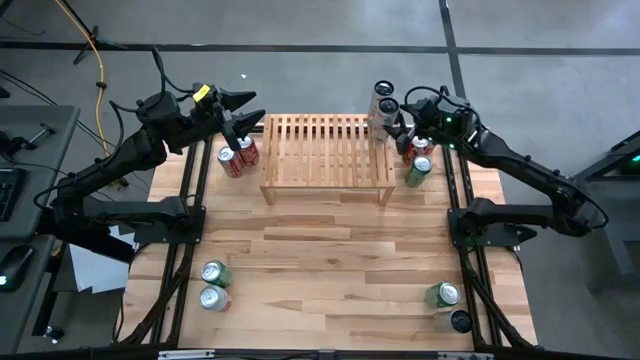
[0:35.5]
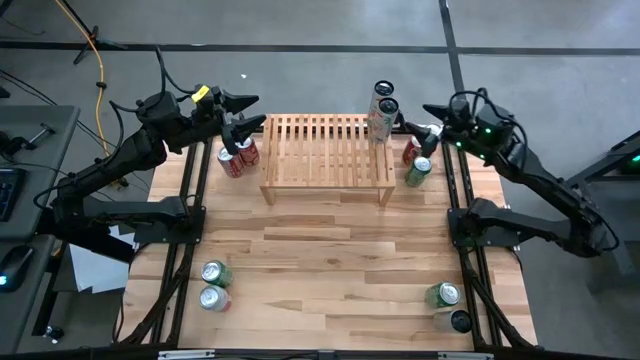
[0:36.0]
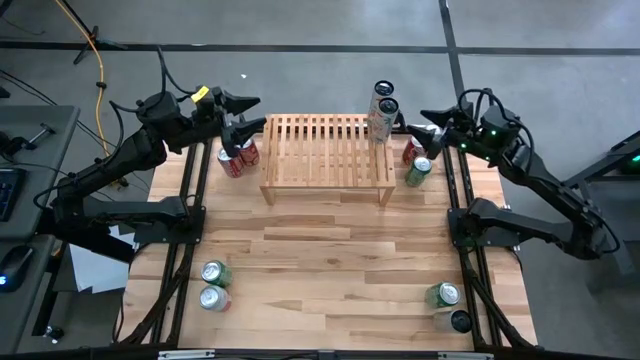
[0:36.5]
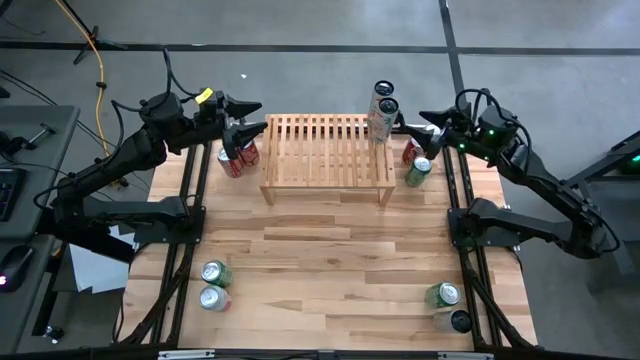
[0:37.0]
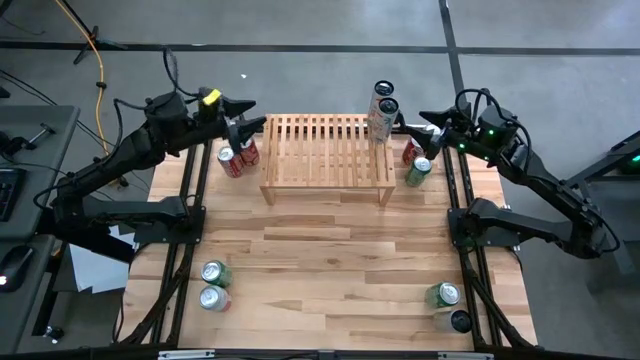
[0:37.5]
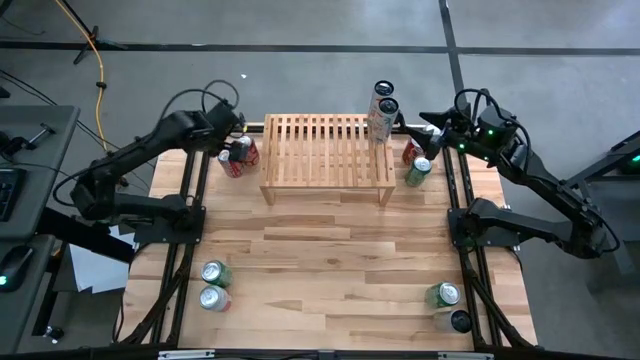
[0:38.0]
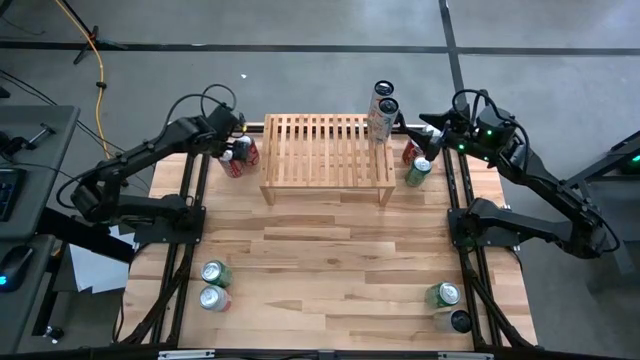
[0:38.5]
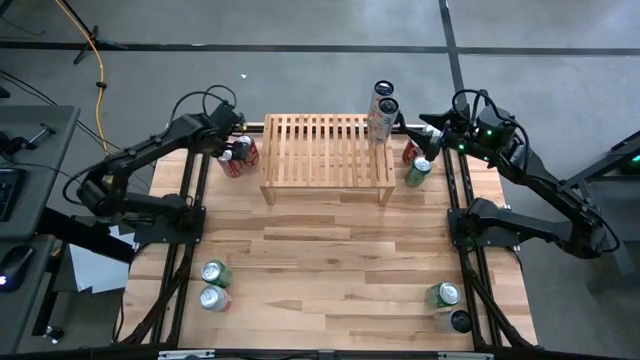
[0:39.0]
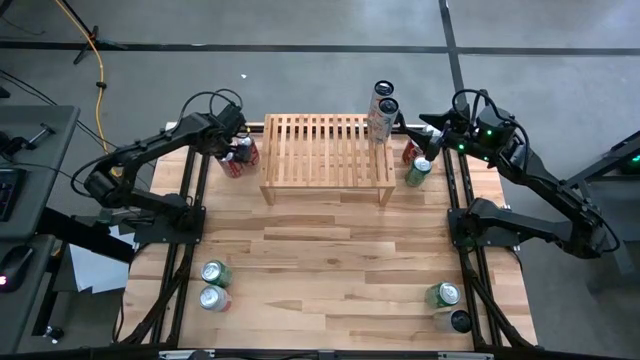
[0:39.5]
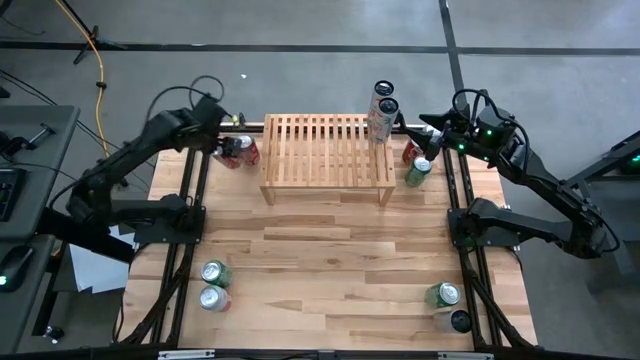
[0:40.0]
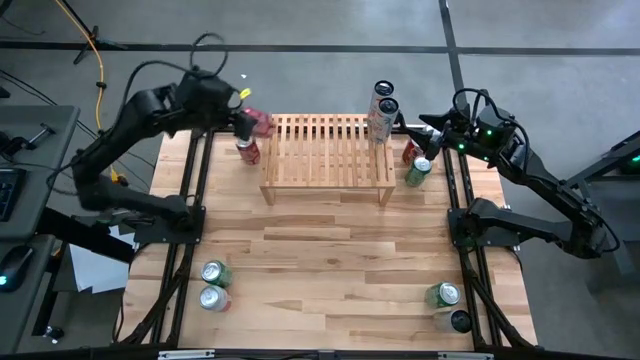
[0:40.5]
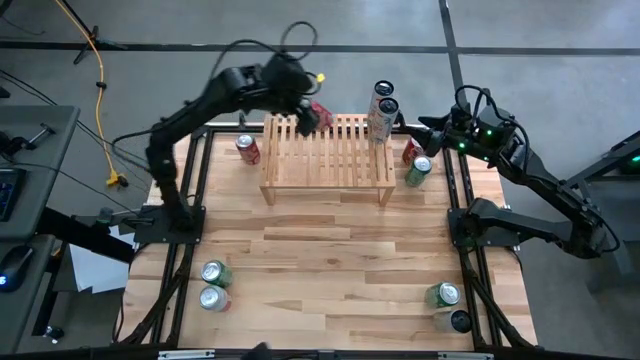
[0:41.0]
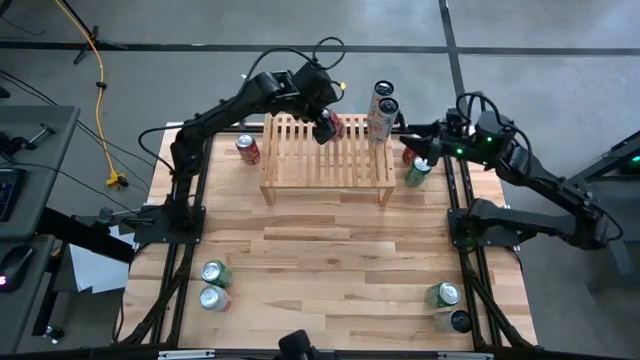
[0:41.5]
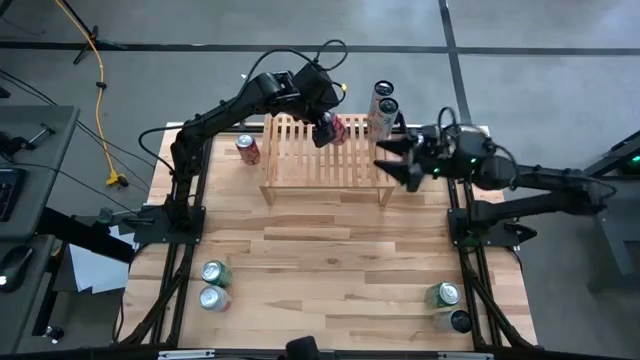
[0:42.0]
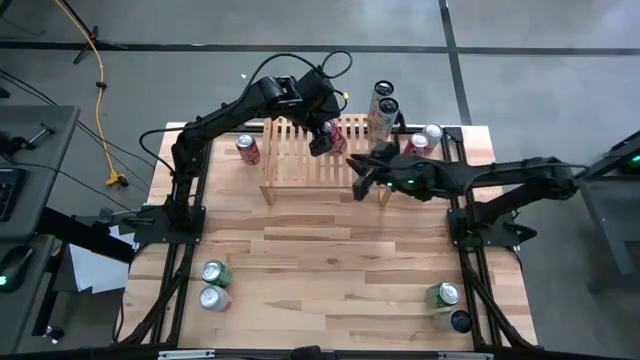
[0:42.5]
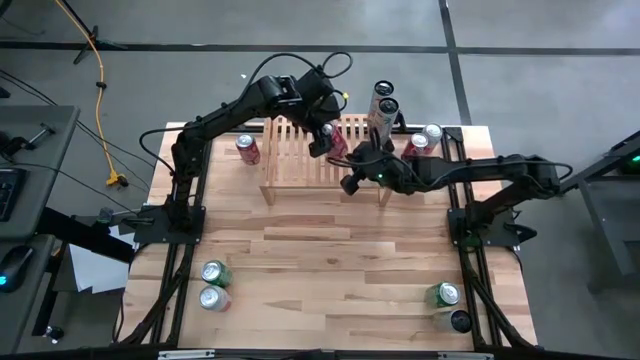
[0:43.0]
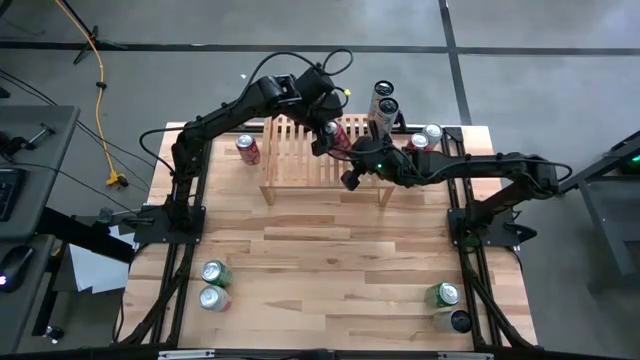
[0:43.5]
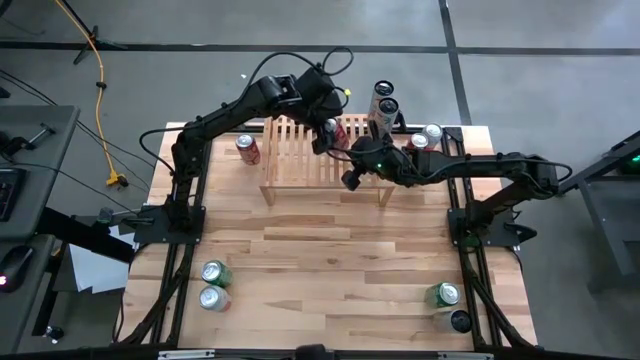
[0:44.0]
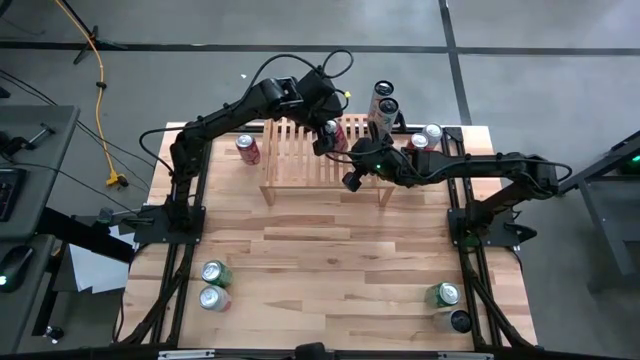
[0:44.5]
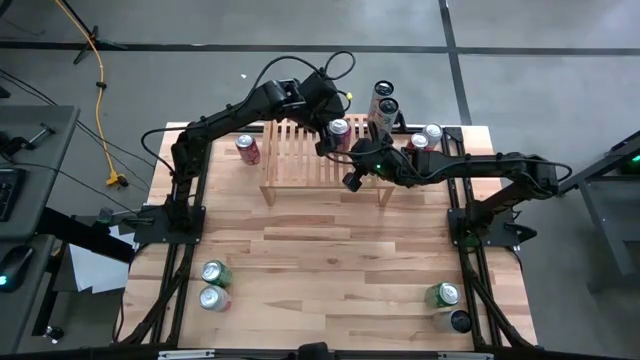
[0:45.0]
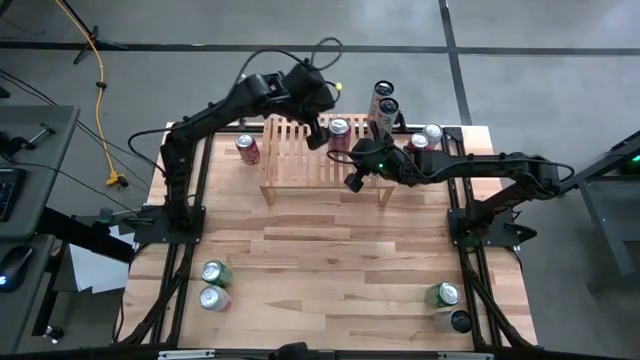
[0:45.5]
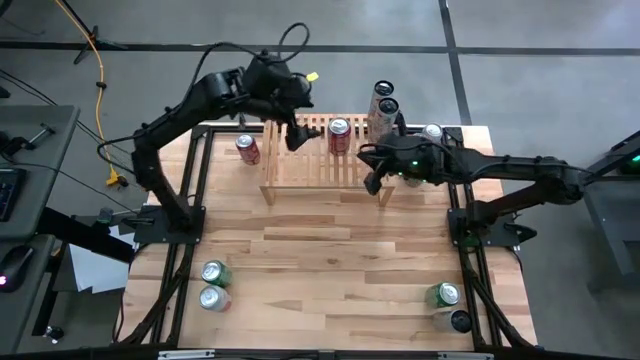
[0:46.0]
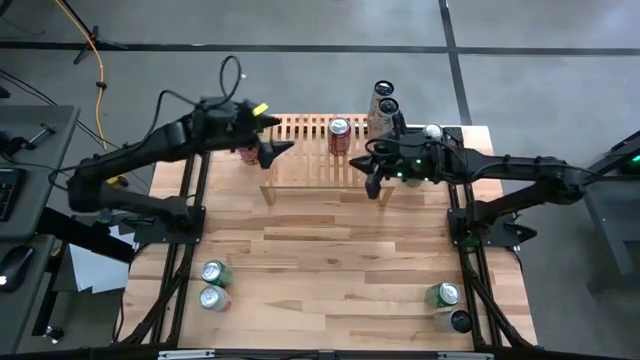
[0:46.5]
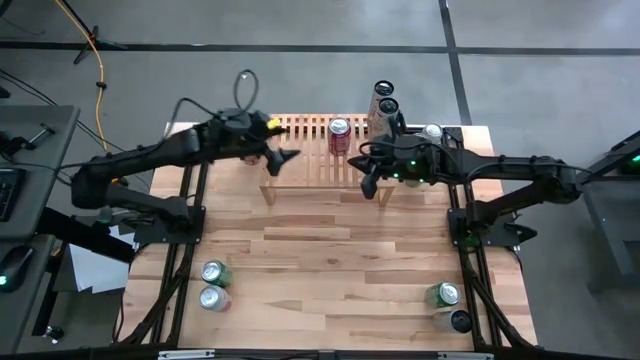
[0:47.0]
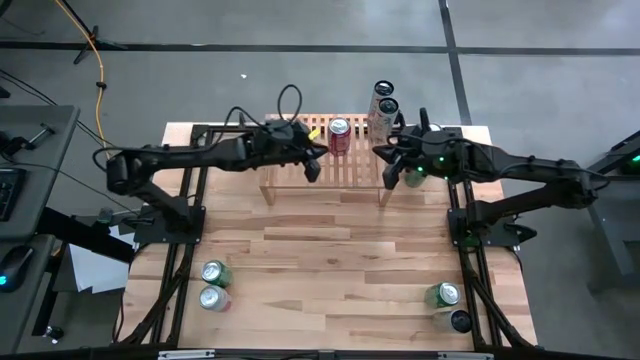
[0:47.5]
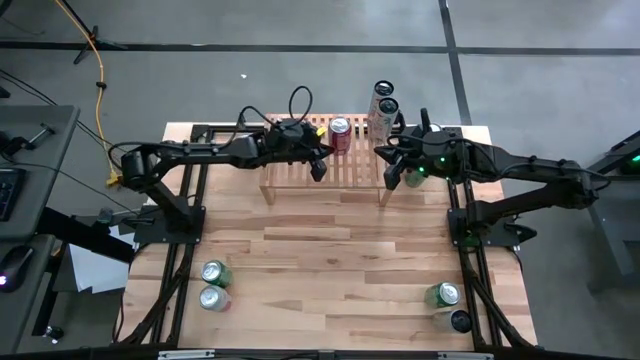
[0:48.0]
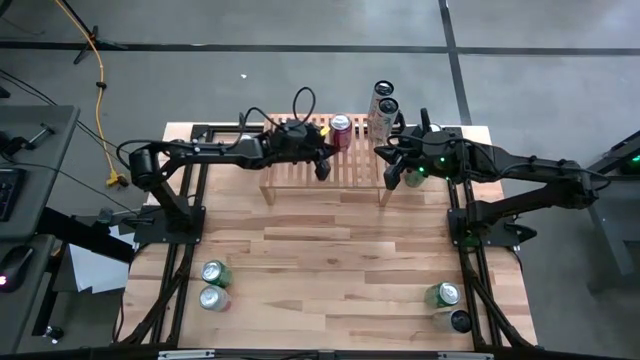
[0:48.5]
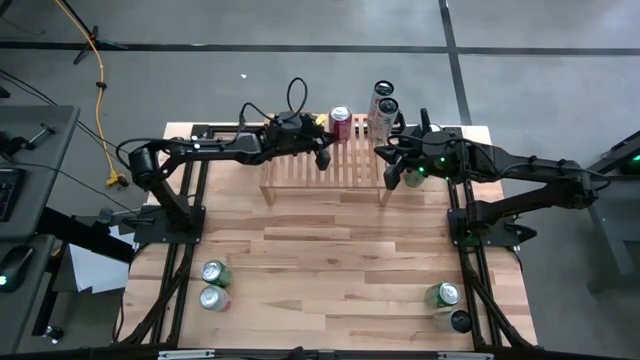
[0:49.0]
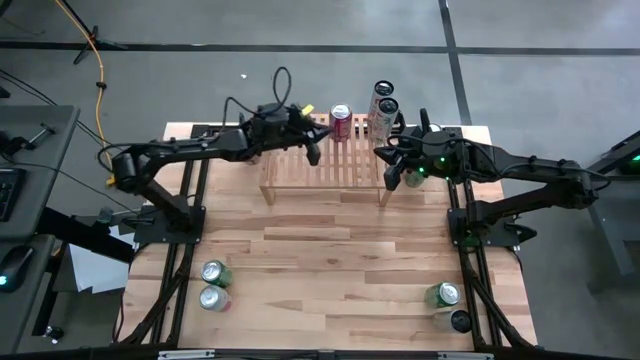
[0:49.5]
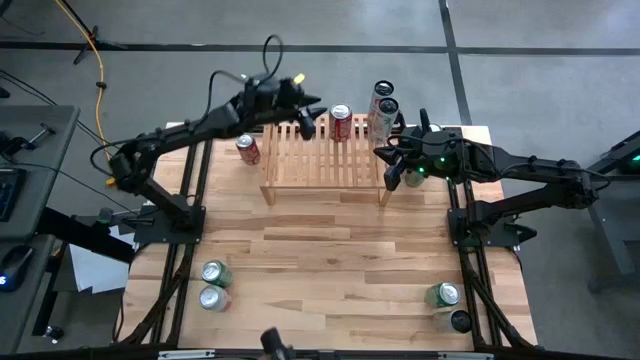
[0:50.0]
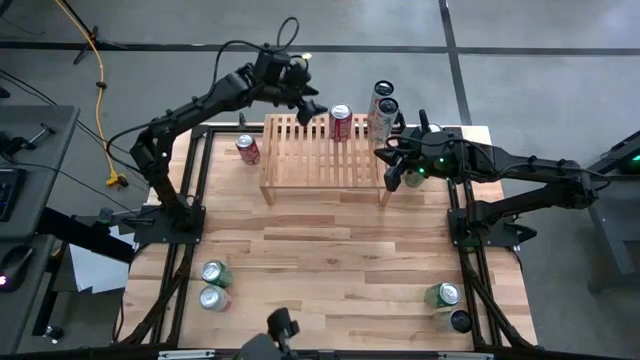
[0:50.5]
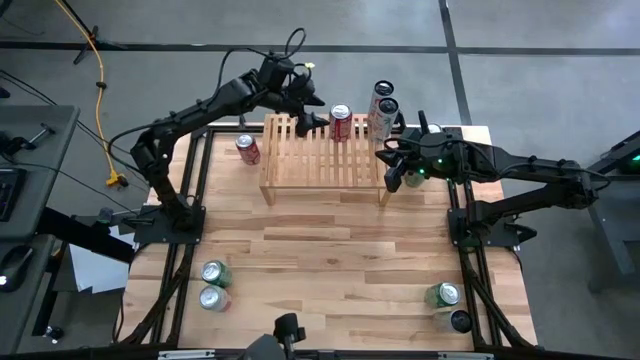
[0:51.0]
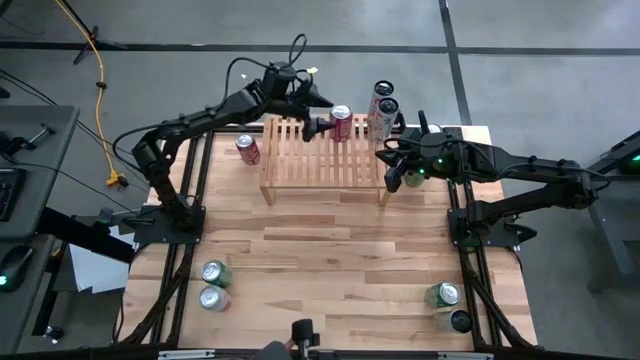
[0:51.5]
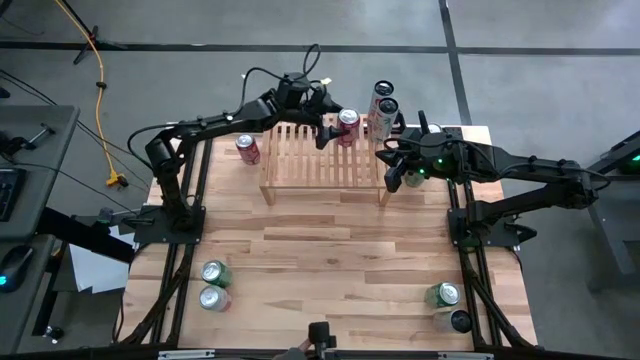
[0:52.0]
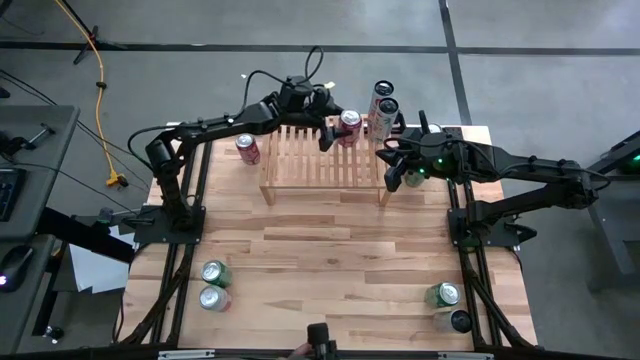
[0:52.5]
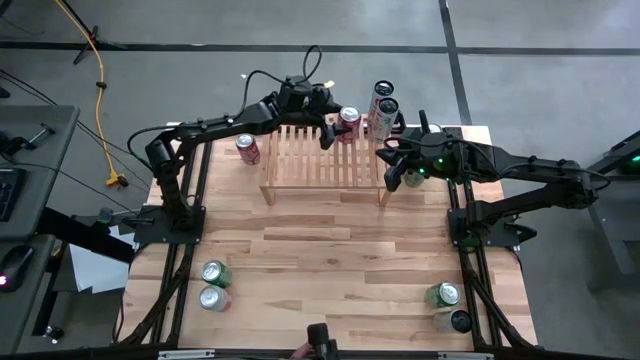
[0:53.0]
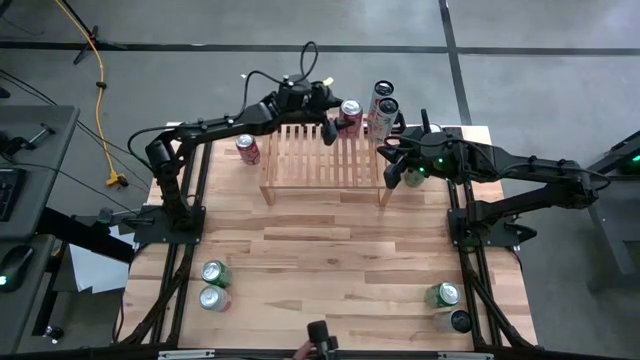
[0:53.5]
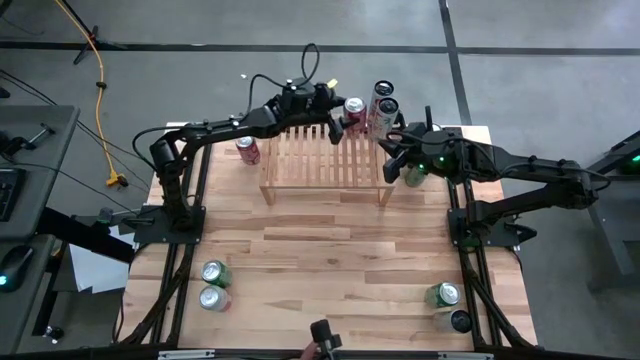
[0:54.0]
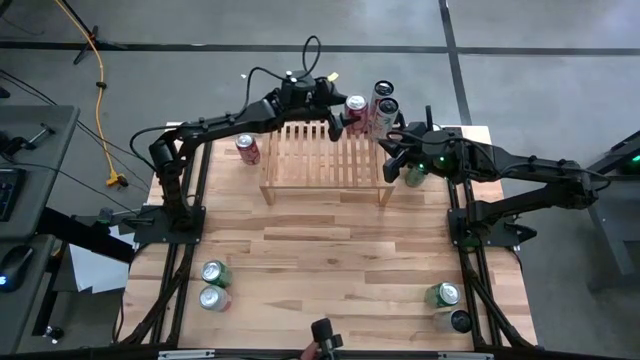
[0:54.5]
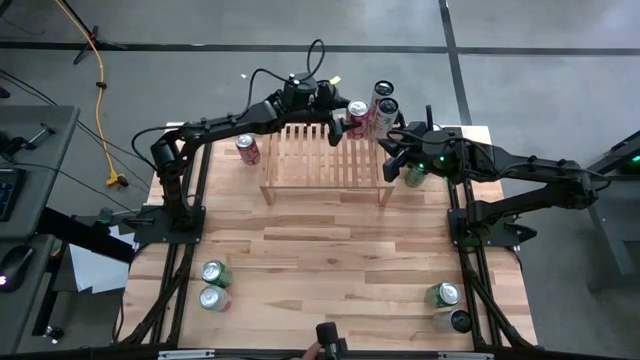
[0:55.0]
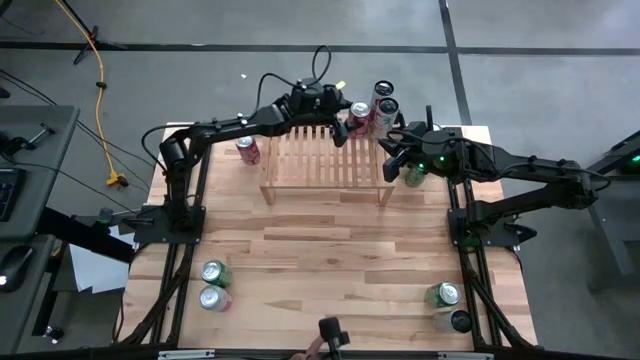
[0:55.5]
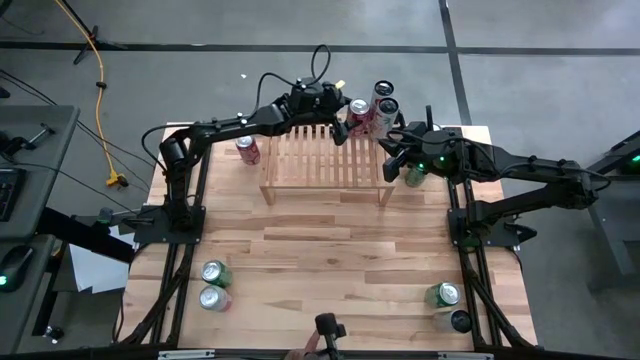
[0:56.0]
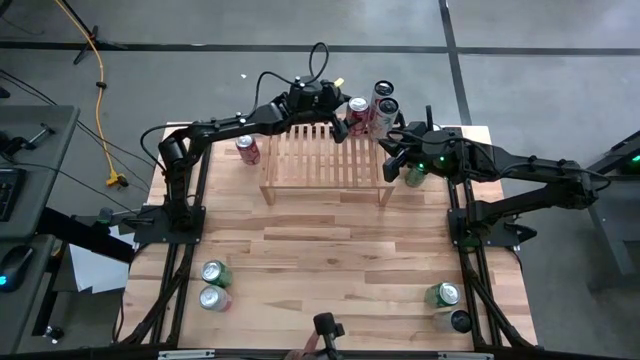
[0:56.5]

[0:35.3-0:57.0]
Task: Place canned beverage on shelf
Put the bottom left red white soda can on the shelf
